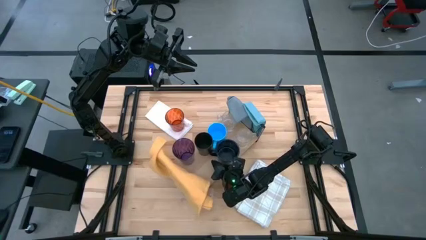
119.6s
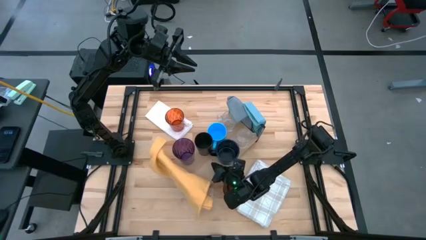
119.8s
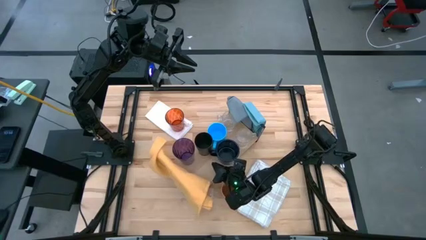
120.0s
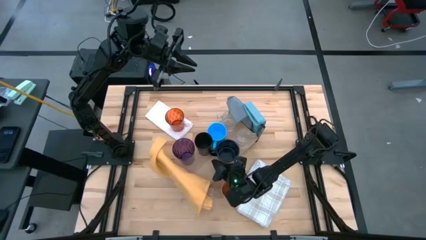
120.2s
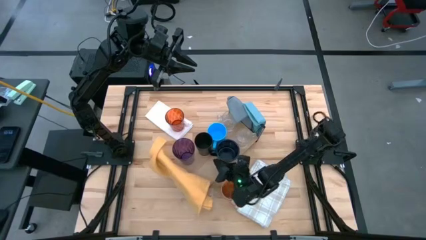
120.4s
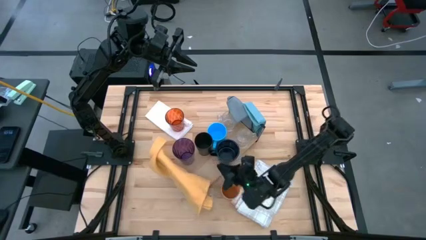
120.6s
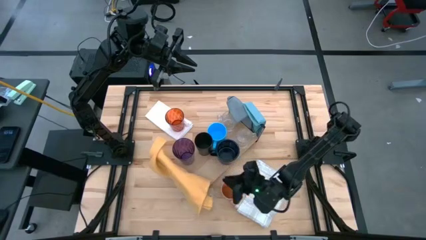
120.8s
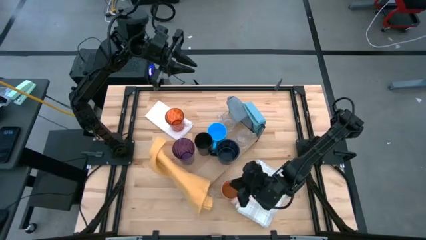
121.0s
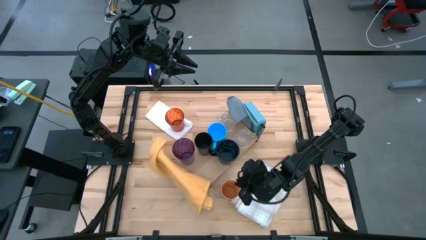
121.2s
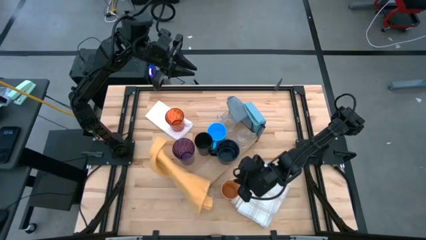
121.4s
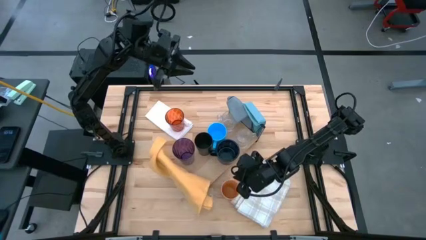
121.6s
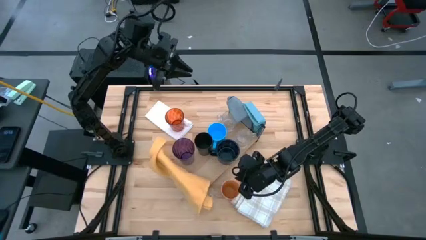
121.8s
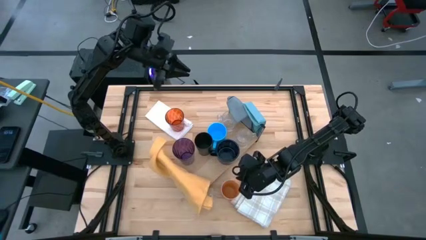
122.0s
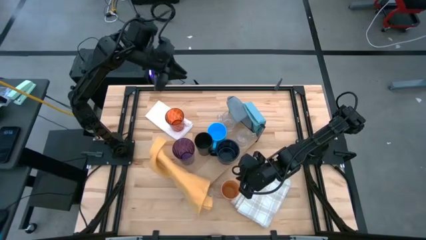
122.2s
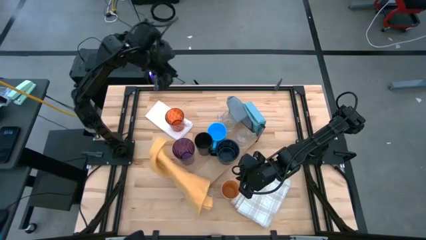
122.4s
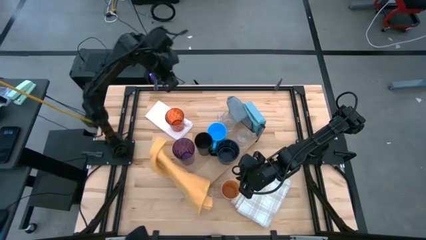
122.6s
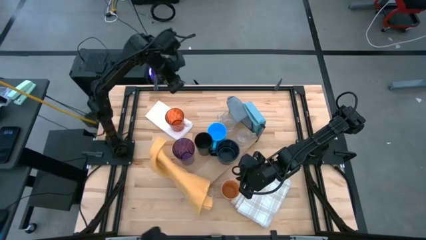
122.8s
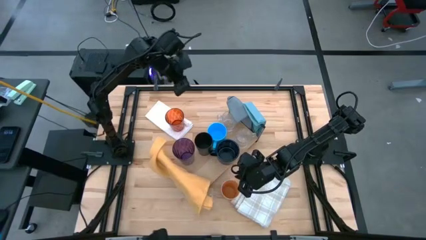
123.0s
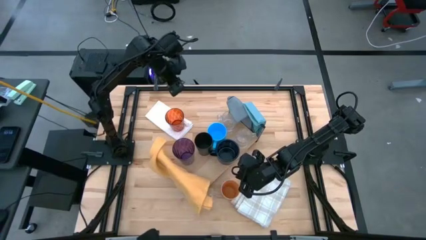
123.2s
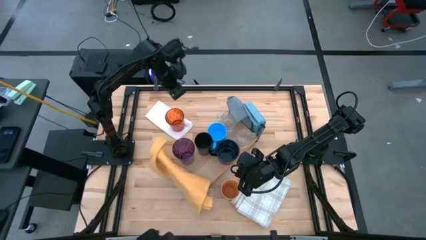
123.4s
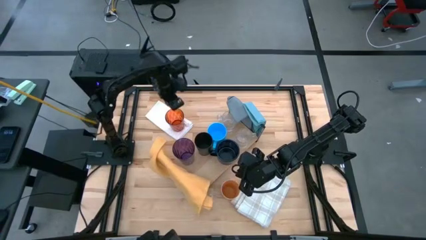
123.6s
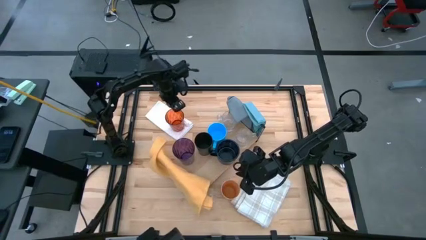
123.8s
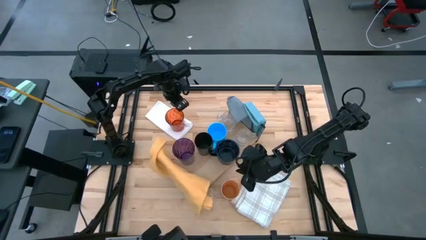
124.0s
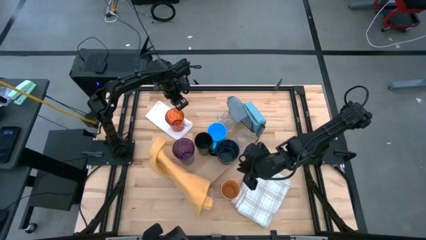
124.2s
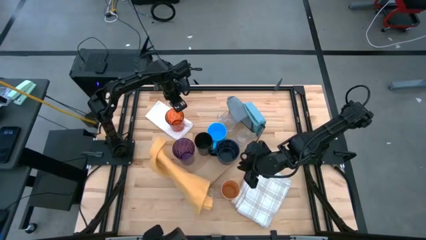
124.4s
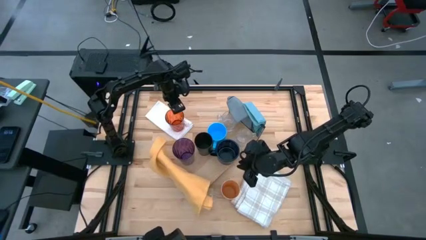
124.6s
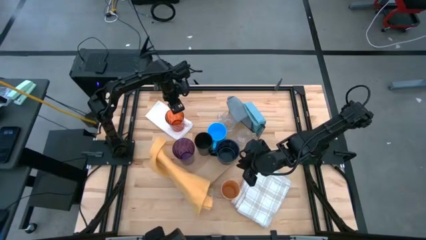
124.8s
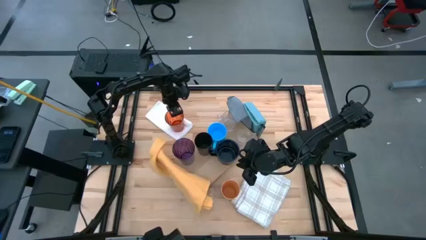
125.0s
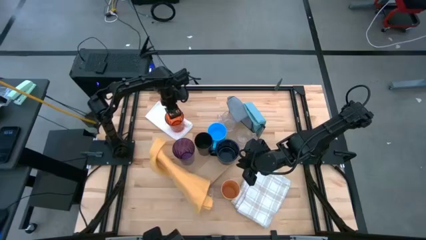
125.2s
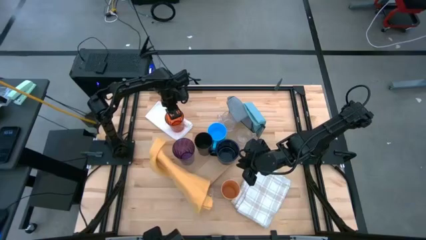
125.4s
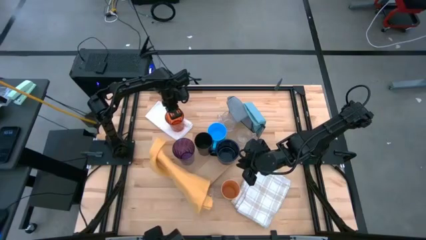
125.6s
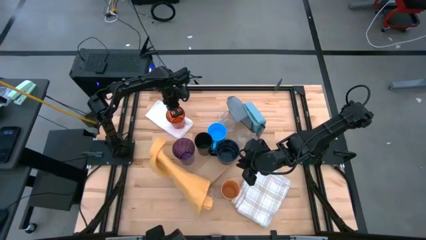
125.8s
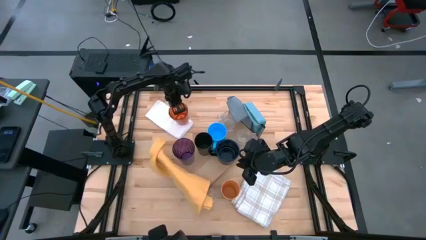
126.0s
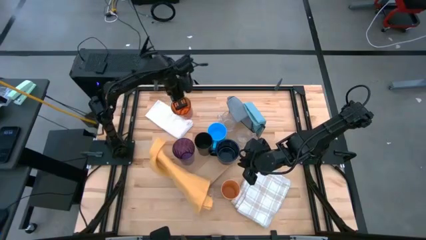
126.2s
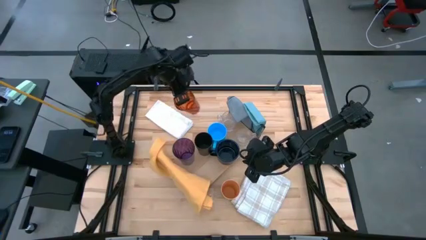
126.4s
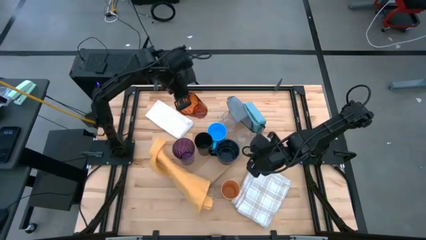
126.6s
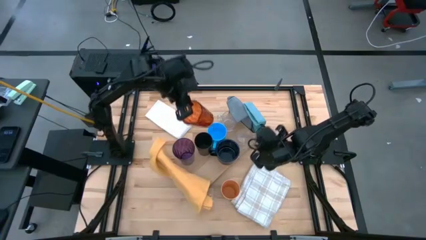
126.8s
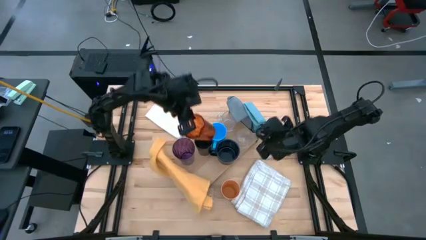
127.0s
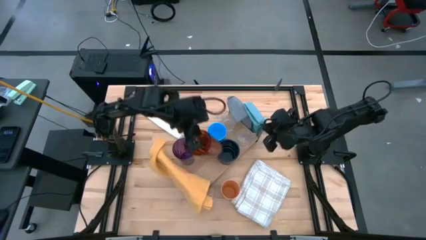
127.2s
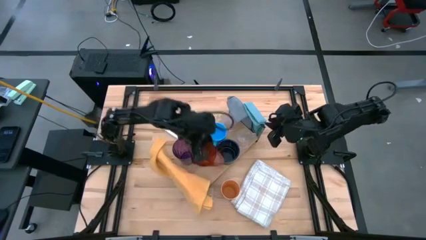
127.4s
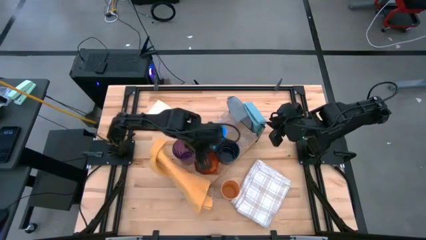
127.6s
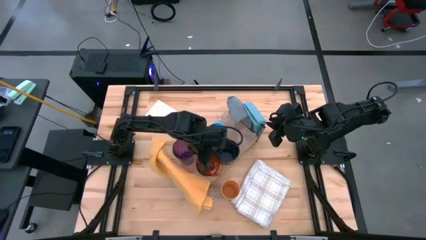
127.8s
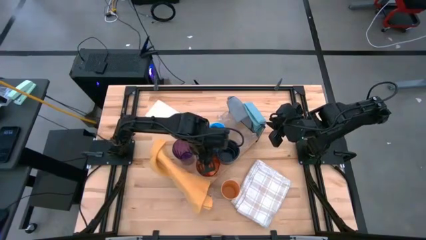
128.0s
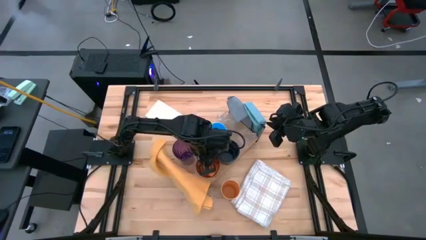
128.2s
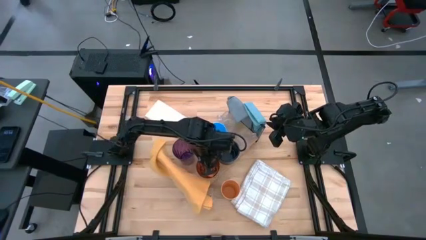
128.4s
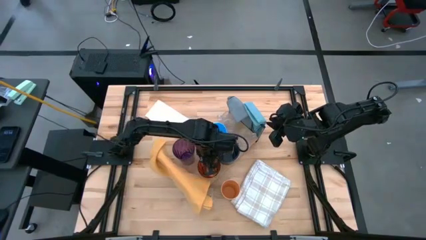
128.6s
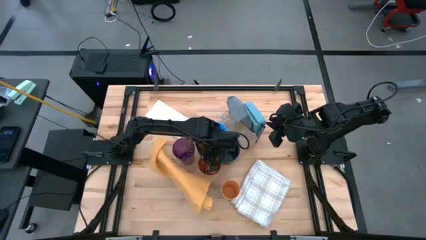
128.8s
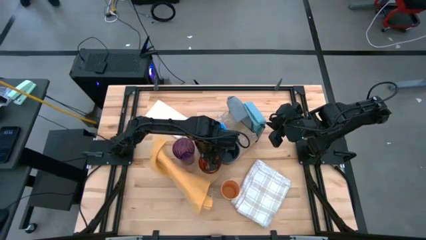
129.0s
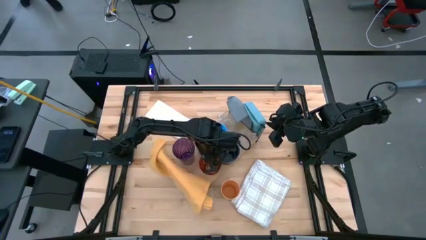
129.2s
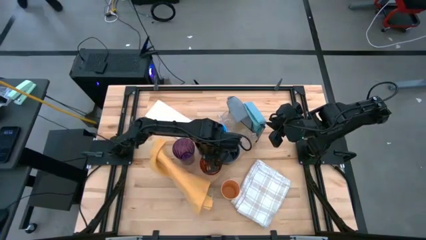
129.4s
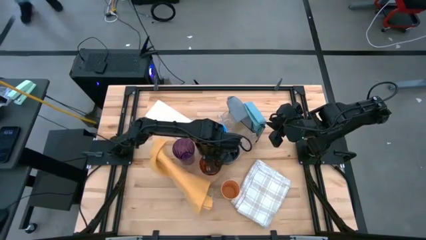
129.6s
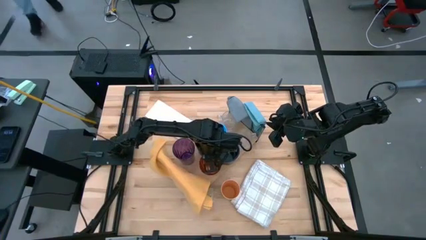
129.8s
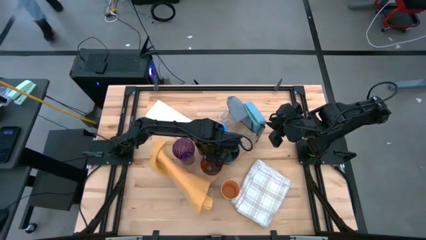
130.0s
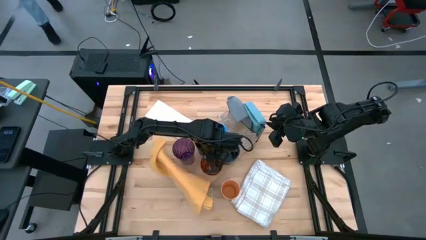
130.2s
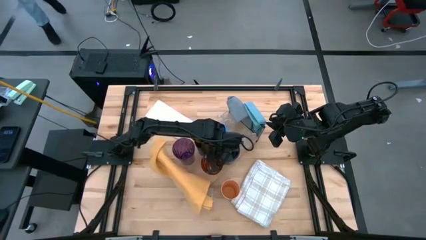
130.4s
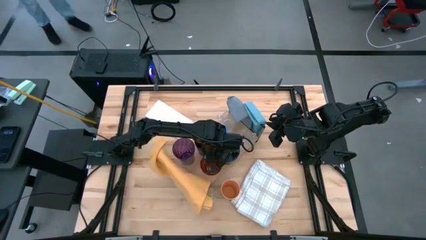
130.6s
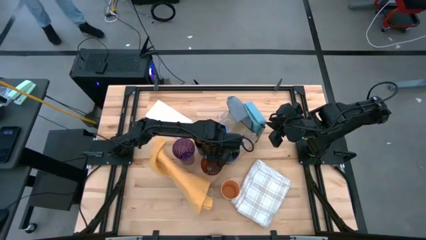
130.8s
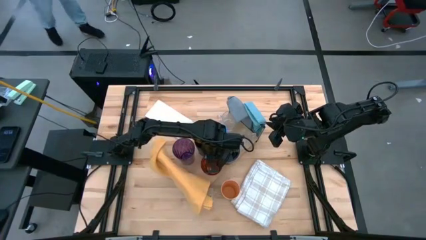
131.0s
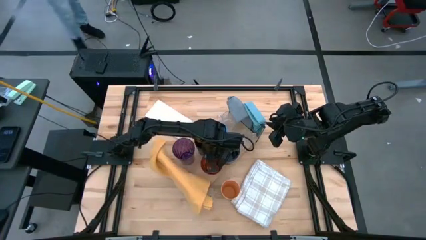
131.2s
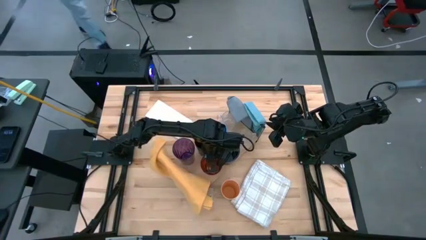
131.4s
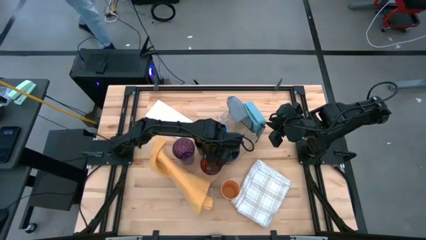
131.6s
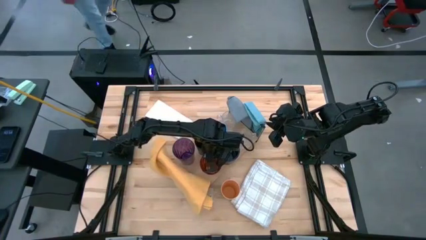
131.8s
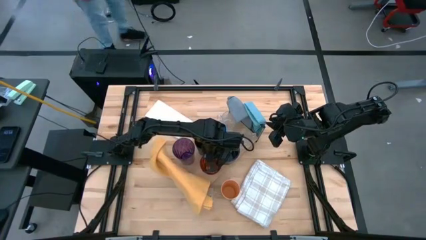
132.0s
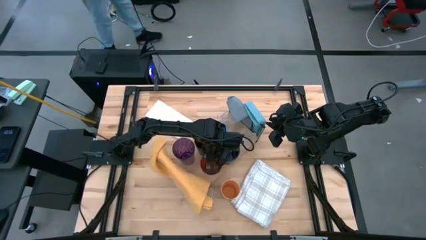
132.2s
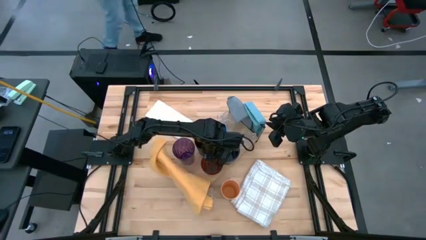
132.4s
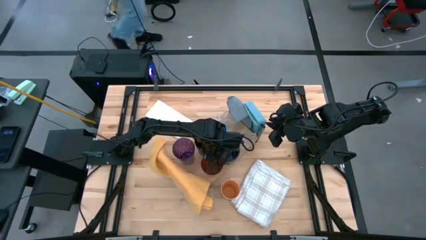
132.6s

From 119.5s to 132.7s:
Task: Stack small to large cups/mugs on shelf
Put the dark orange cup on the shelf
